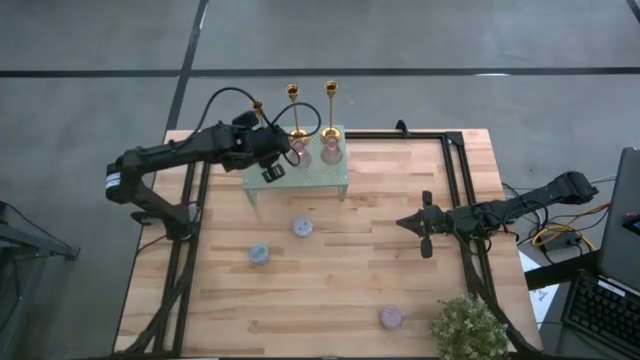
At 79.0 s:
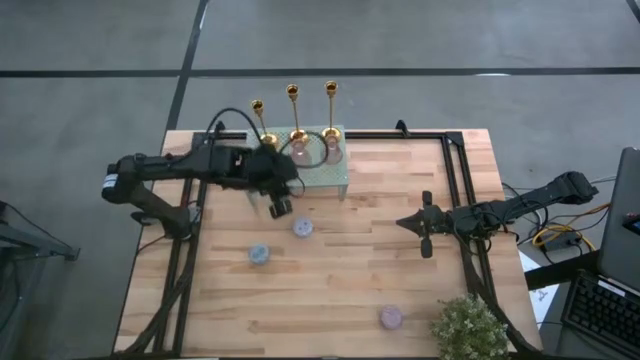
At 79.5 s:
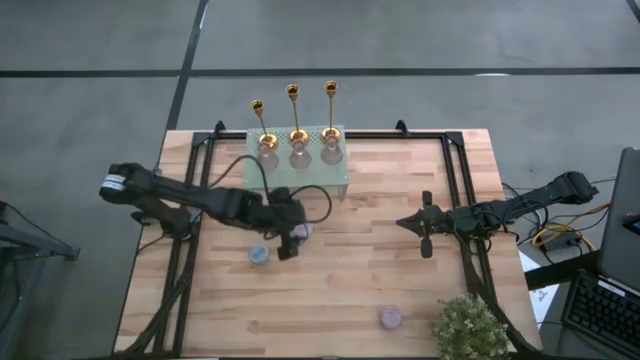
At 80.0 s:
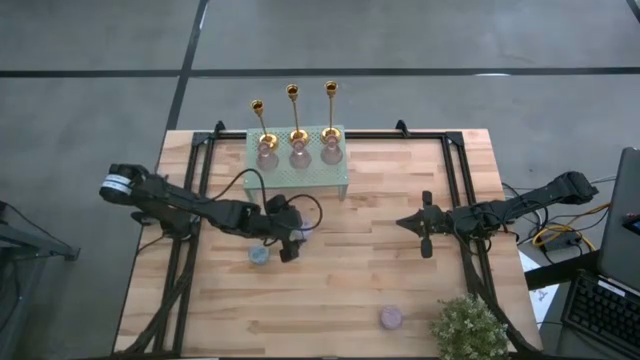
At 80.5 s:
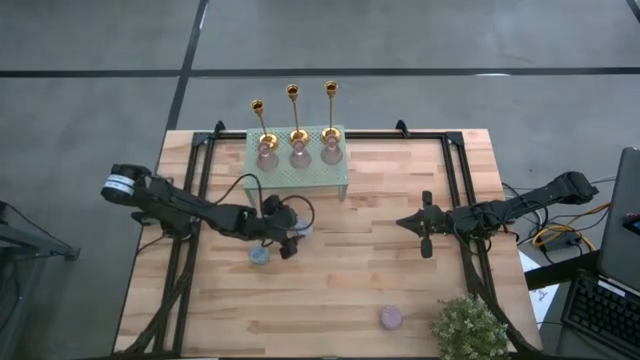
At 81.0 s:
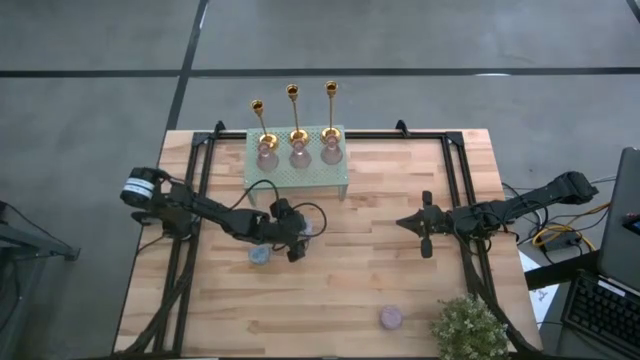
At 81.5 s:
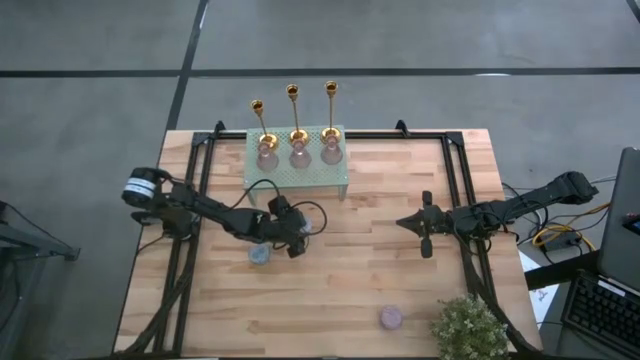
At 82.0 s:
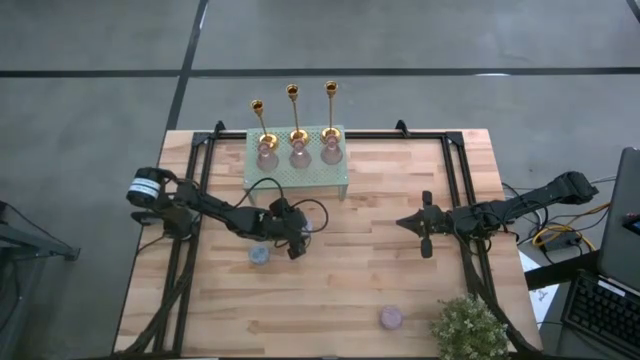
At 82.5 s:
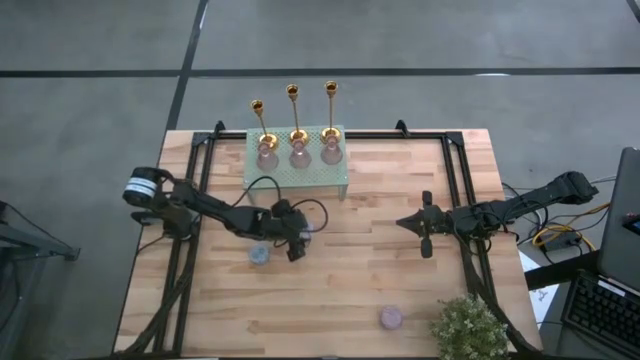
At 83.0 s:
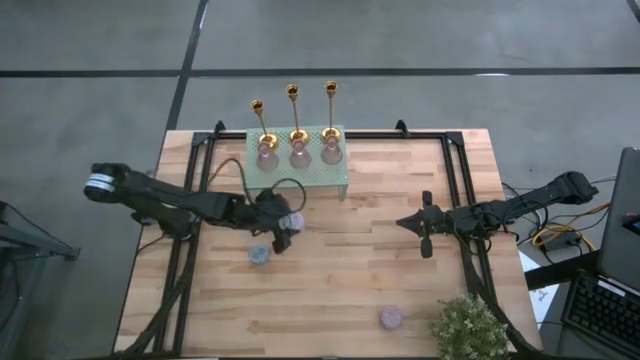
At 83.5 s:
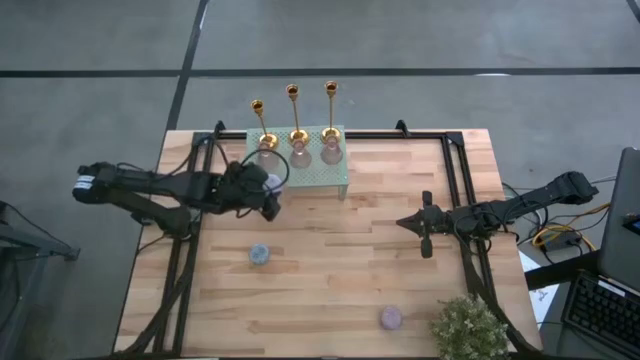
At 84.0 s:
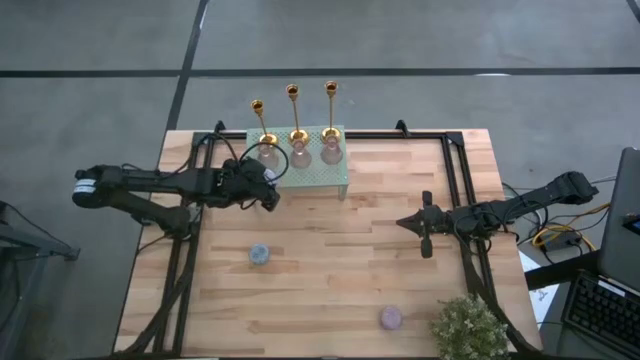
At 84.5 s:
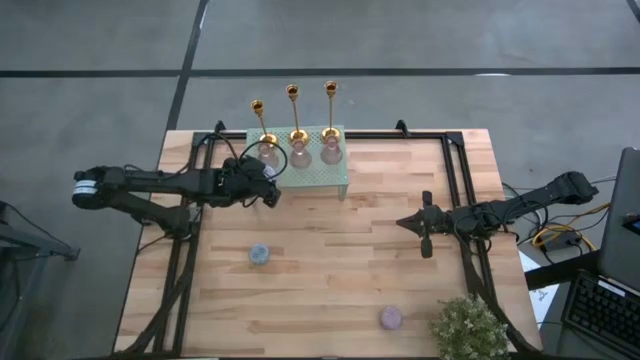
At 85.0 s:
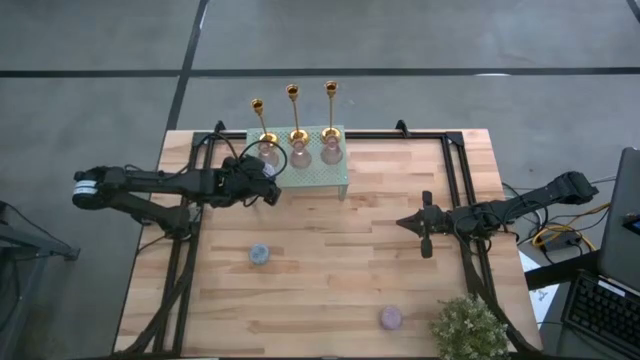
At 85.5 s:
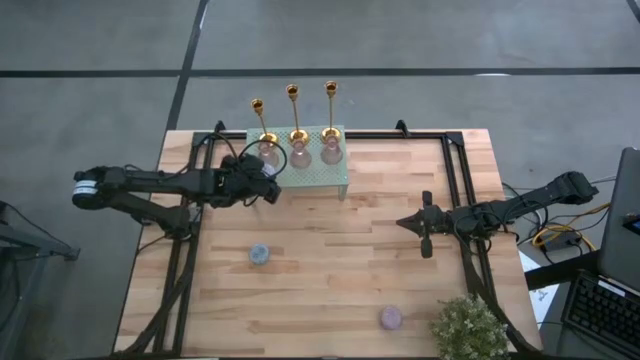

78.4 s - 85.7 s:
Task: Pick & Place candle stick holders
Put the red scented candle on the shelf

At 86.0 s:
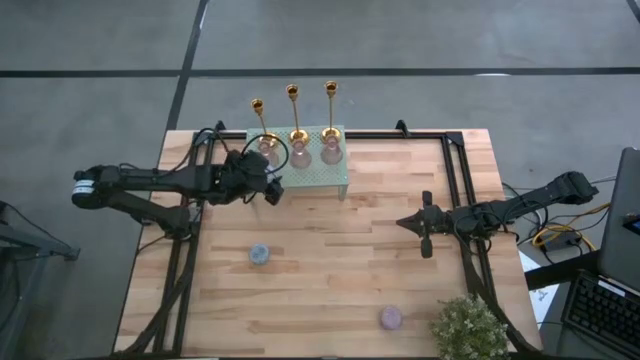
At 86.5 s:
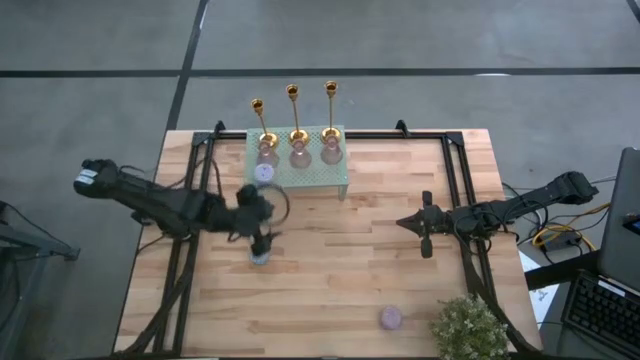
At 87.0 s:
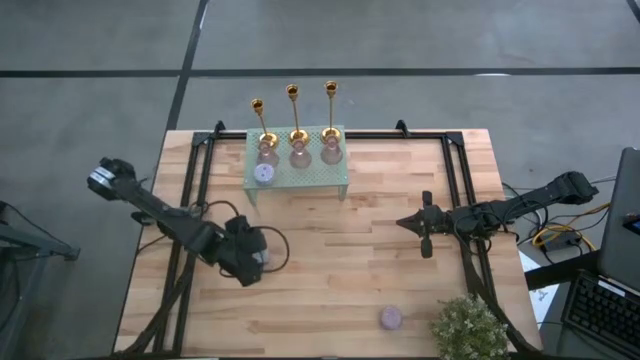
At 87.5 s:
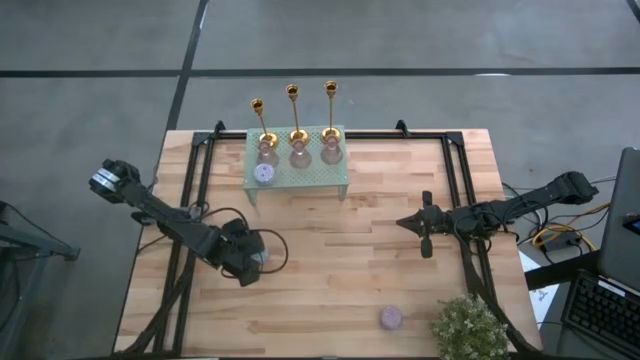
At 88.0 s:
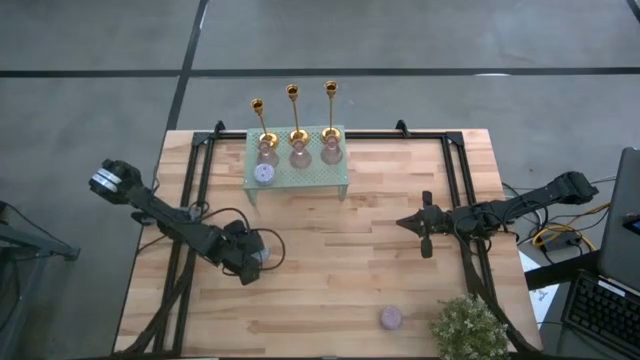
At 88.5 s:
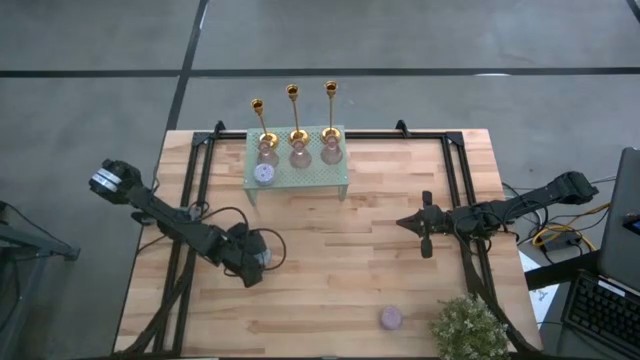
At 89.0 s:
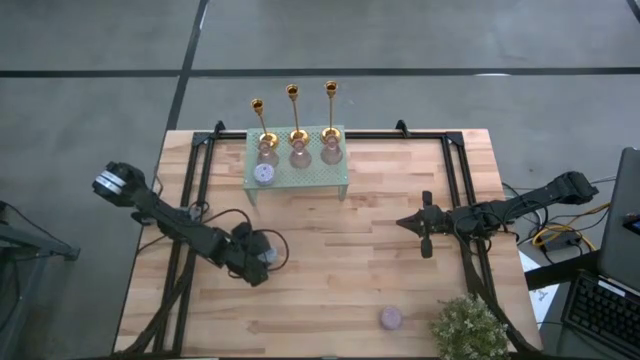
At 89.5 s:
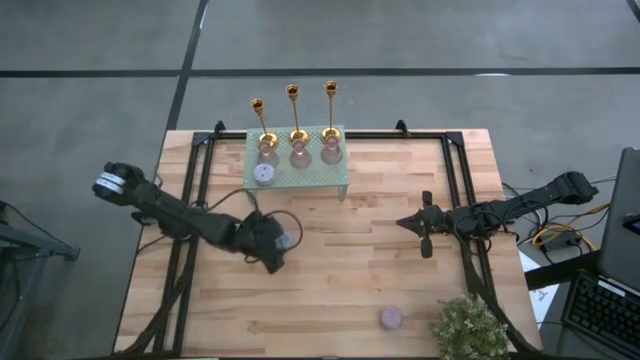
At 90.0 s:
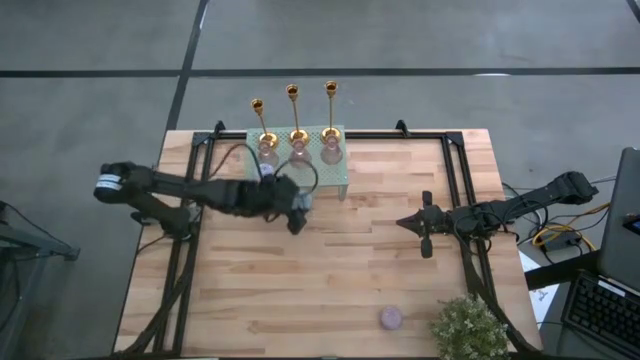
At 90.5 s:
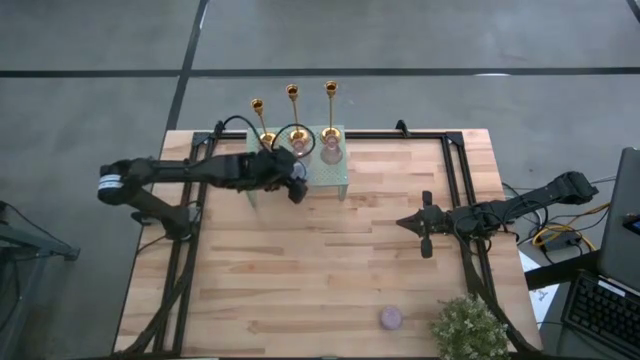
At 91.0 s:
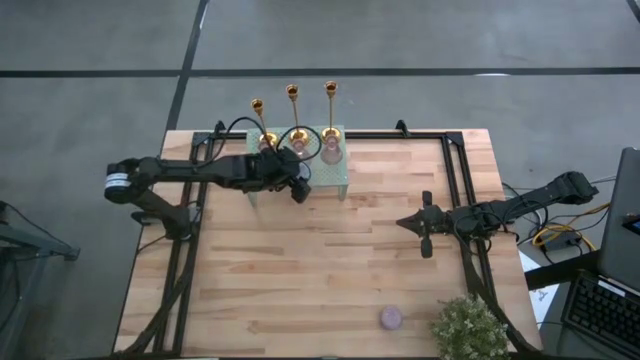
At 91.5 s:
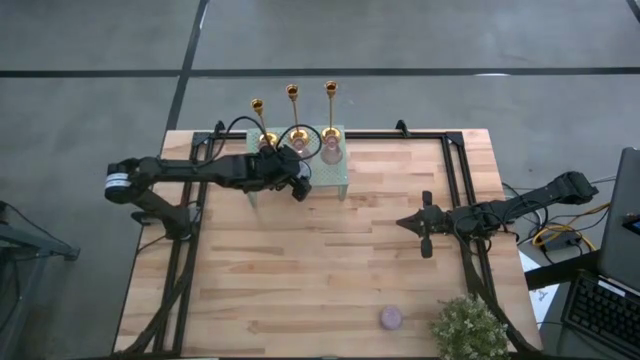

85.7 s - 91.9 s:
Put the green scented candle on the shelf

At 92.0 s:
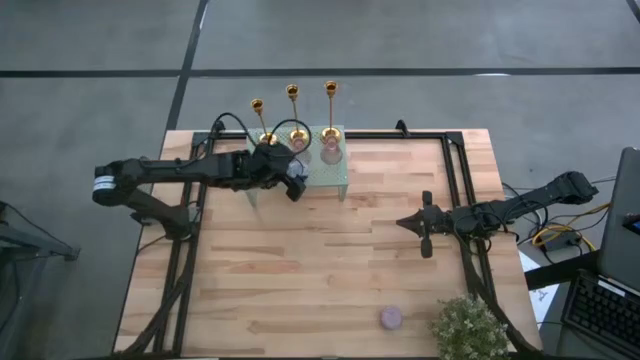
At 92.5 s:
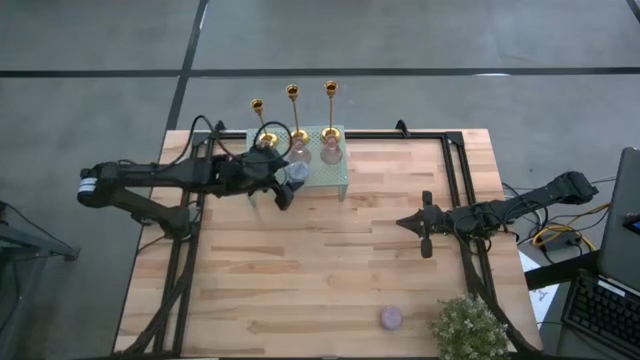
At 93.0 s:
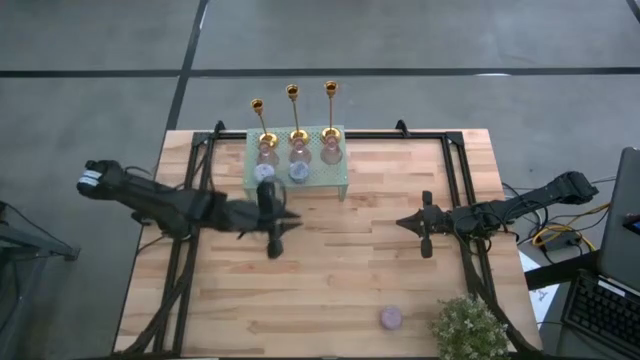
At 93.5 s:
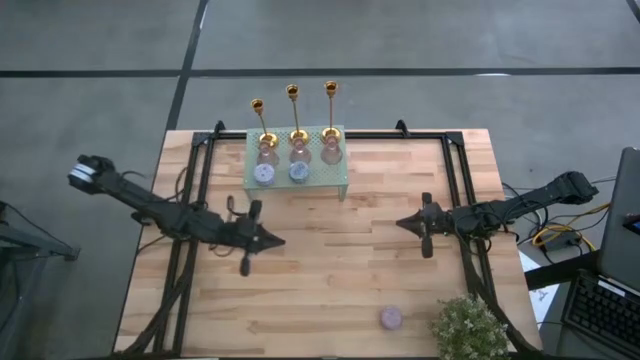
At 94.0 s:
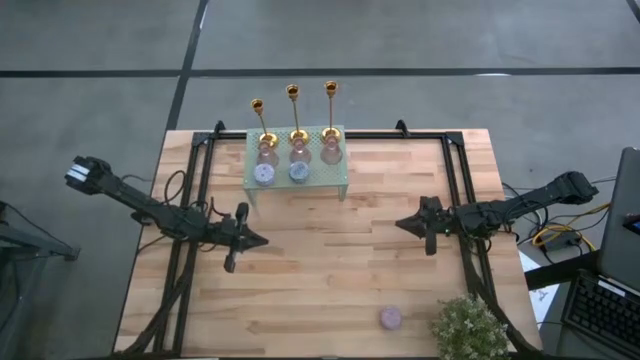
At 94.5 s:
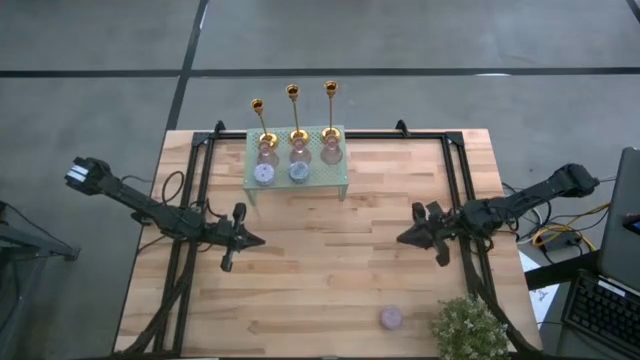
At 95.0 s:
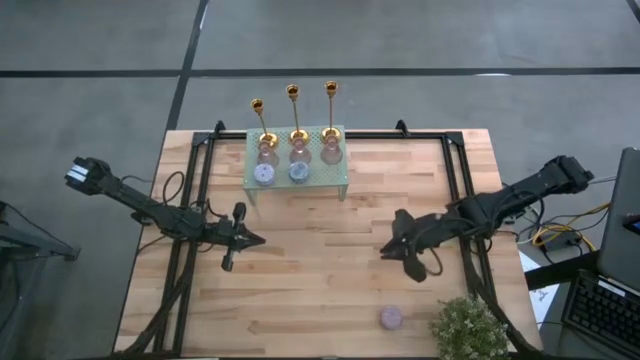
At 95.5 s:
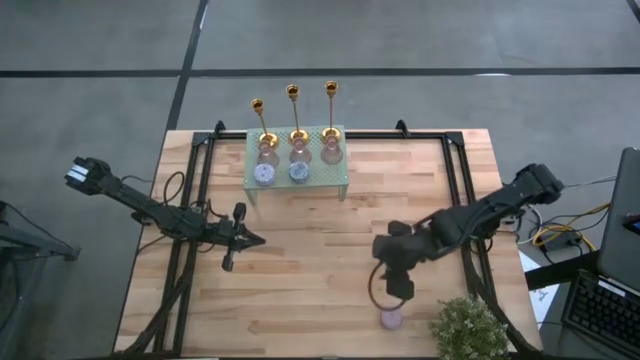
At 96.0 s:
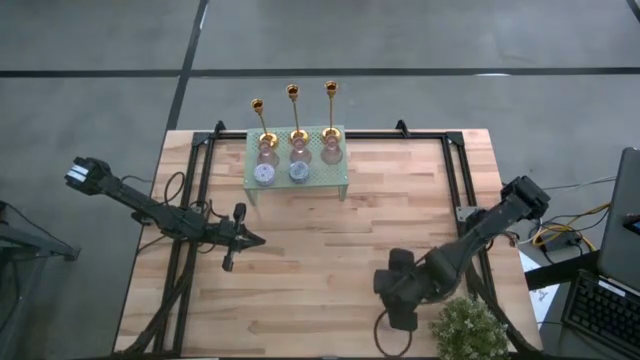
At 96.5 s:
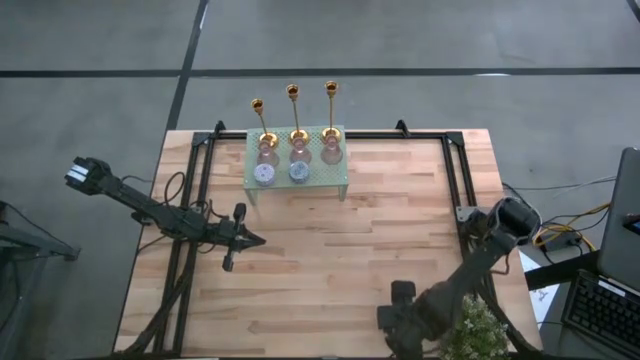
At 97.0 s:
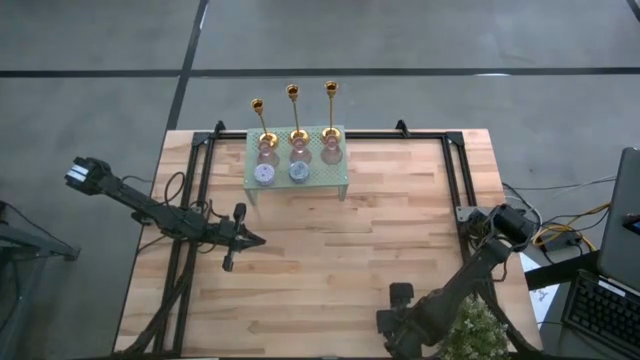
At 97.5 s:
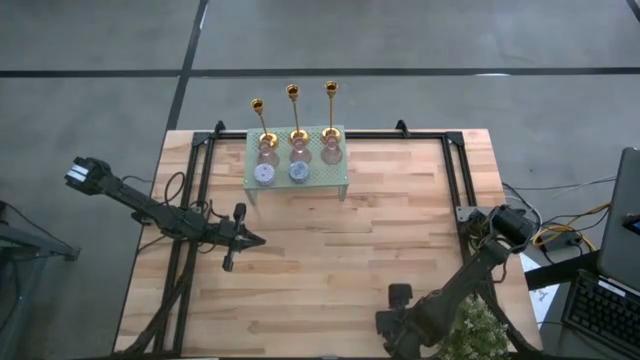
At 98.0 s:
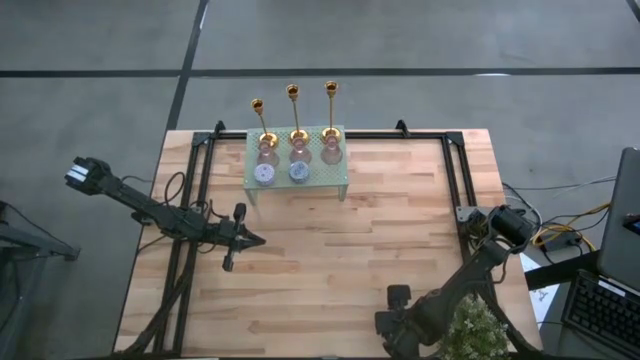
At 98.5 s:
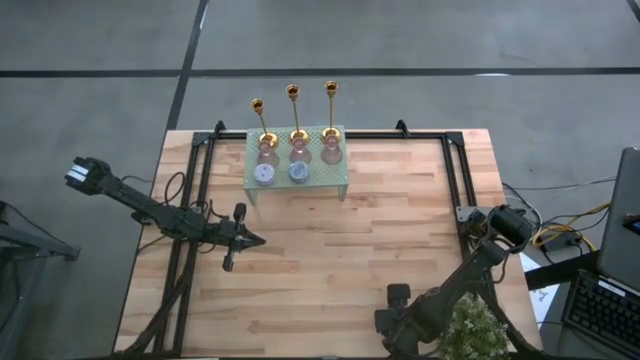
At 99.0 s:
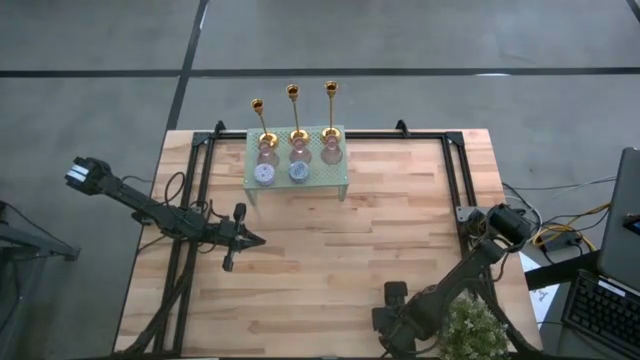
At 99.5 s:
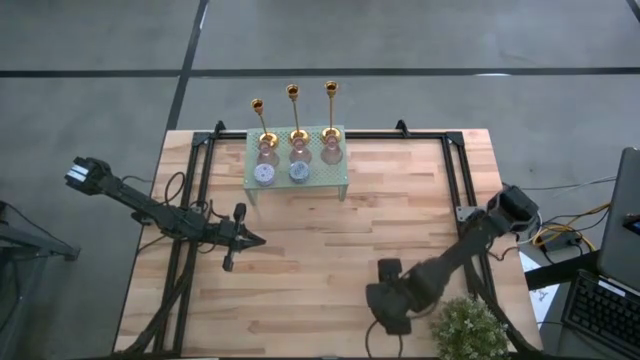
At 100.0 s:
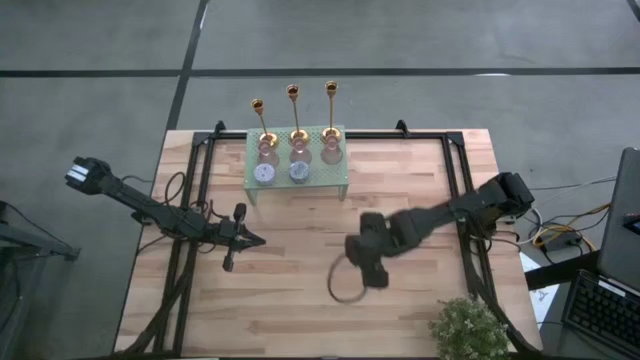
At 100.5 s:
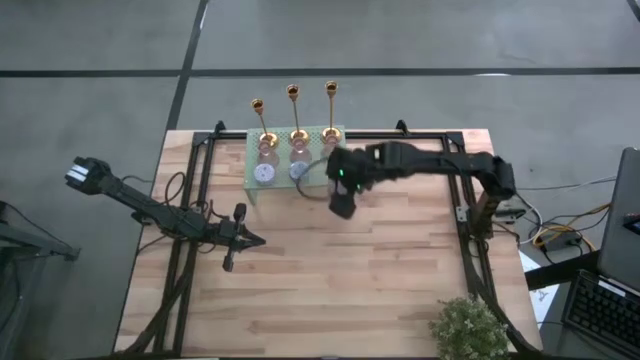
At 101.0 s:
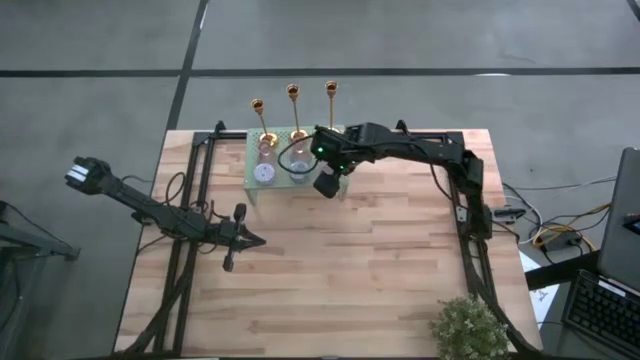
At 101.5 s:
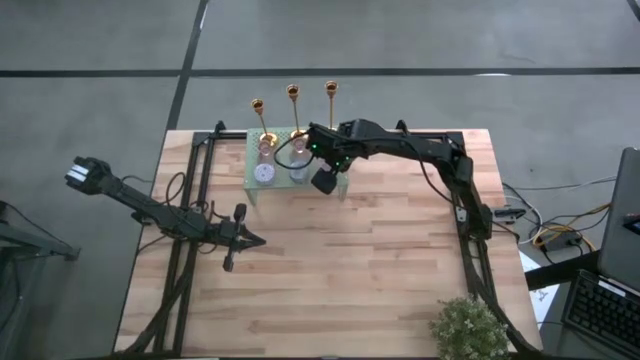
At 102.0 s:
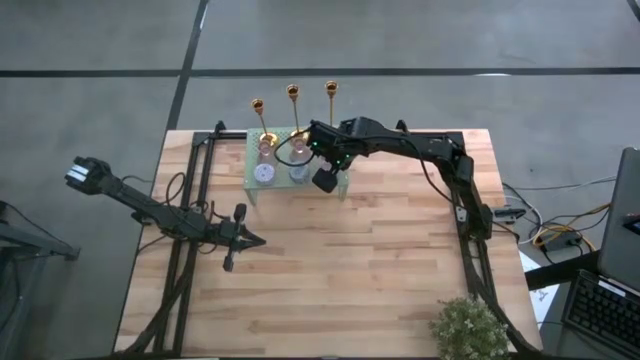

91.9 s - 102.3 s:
Put the pink scented candle on the shelf
